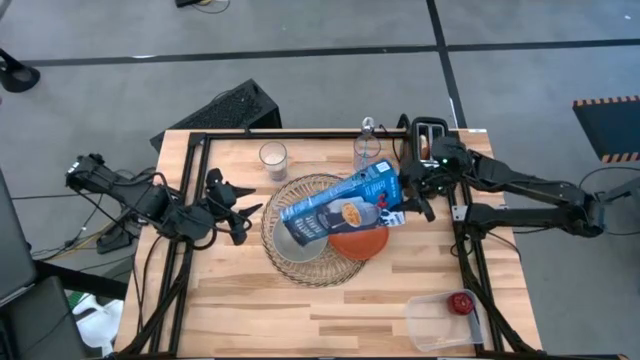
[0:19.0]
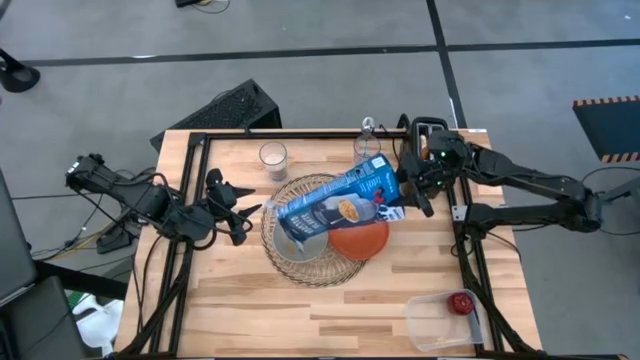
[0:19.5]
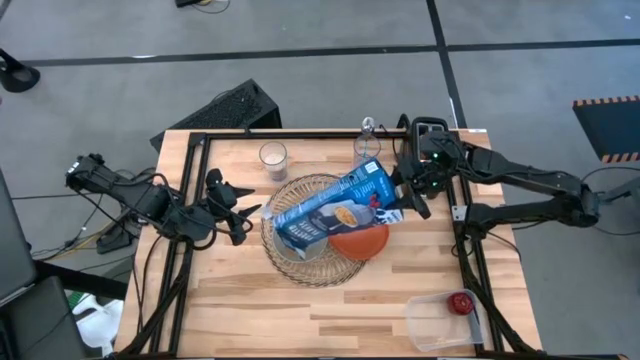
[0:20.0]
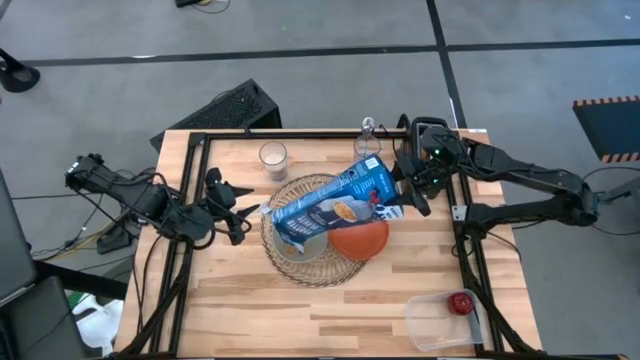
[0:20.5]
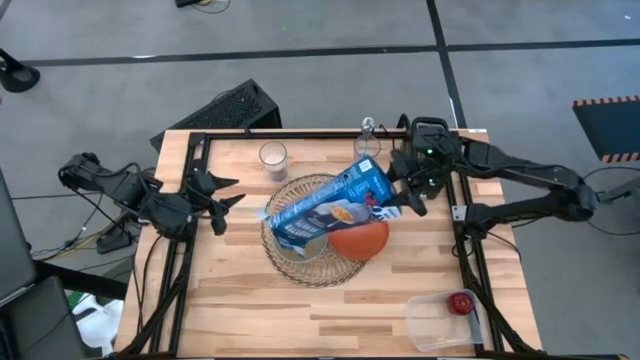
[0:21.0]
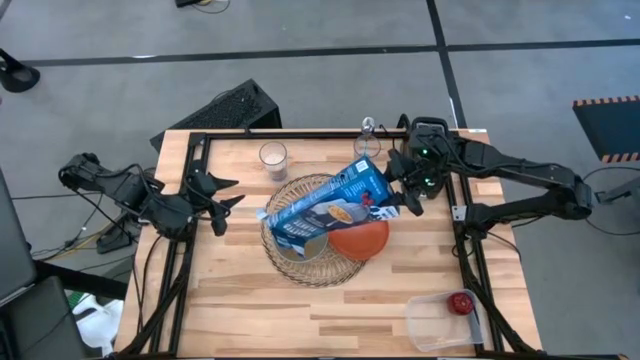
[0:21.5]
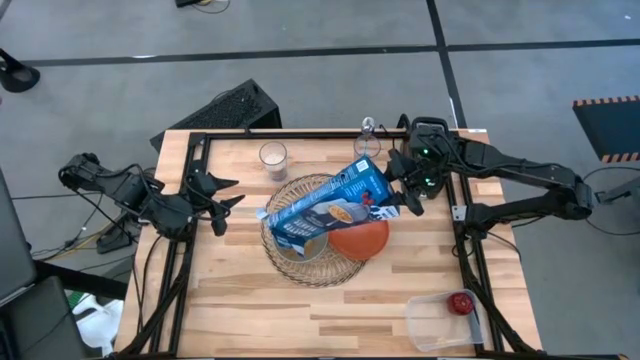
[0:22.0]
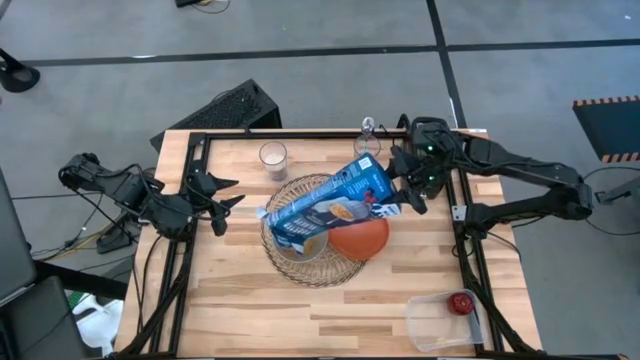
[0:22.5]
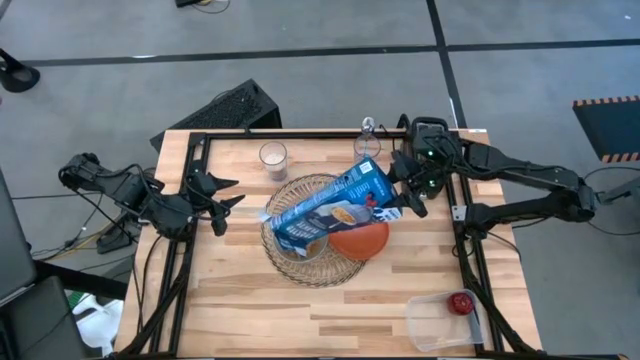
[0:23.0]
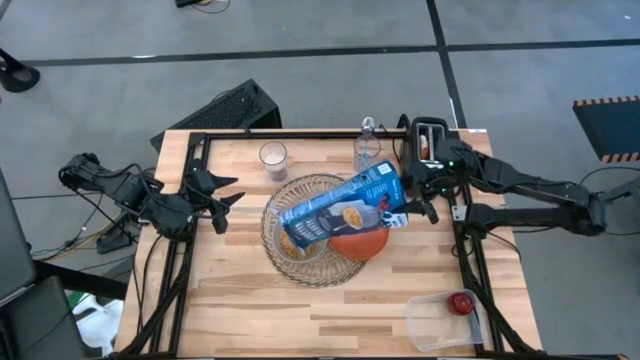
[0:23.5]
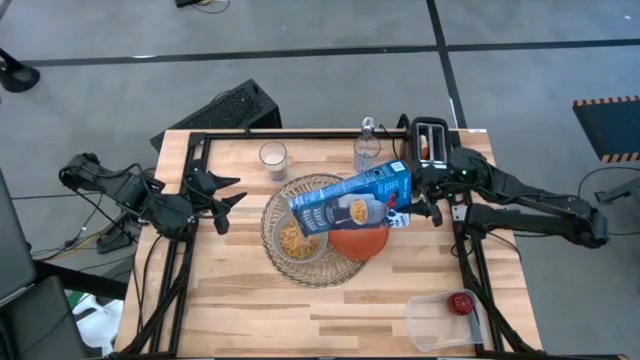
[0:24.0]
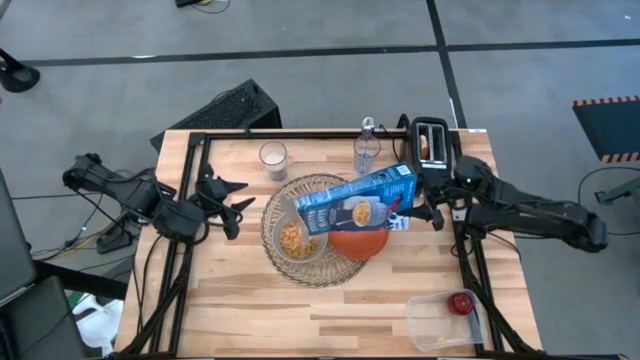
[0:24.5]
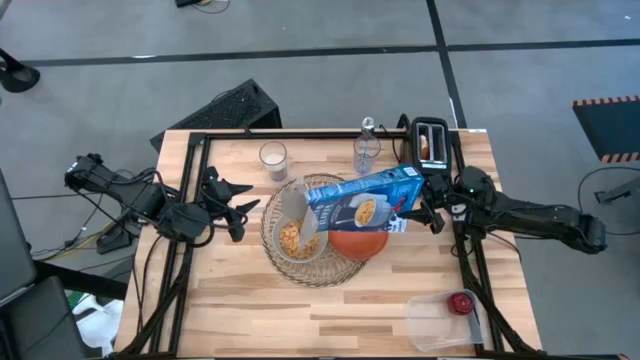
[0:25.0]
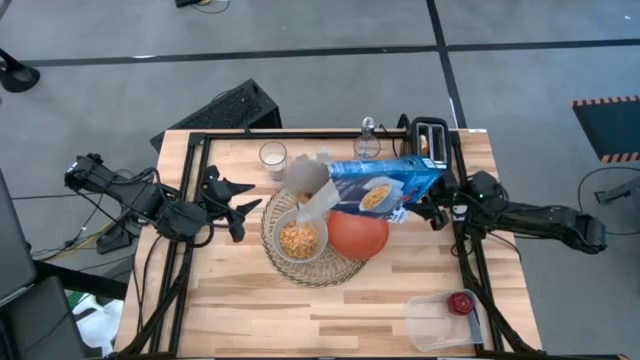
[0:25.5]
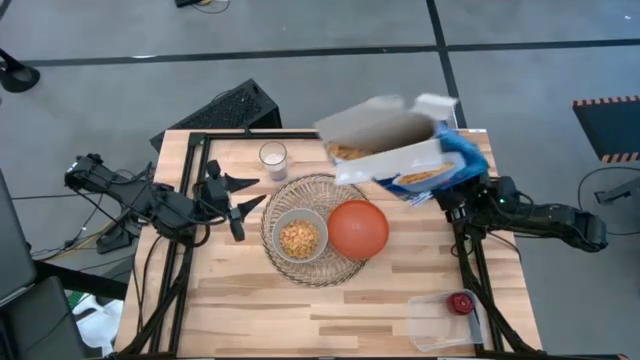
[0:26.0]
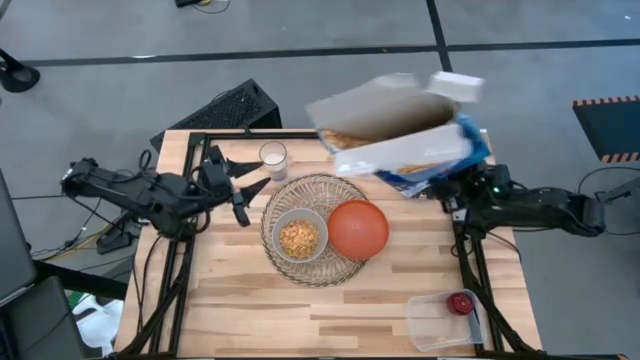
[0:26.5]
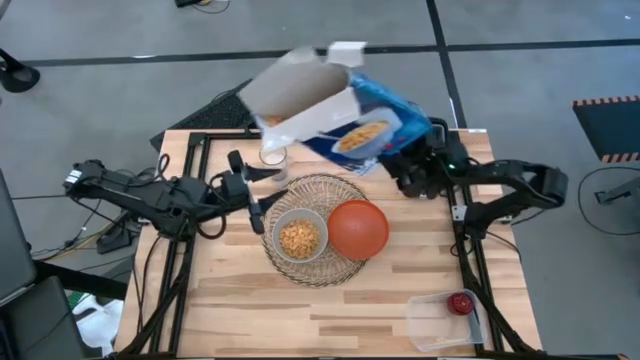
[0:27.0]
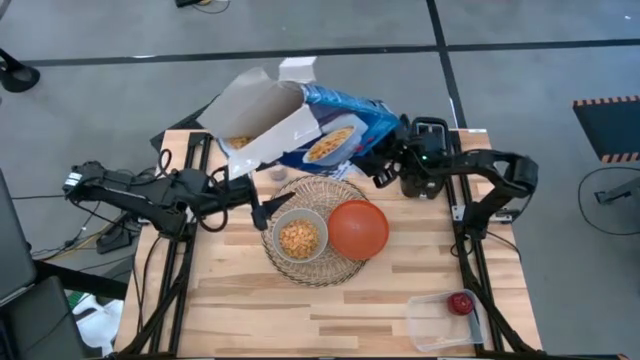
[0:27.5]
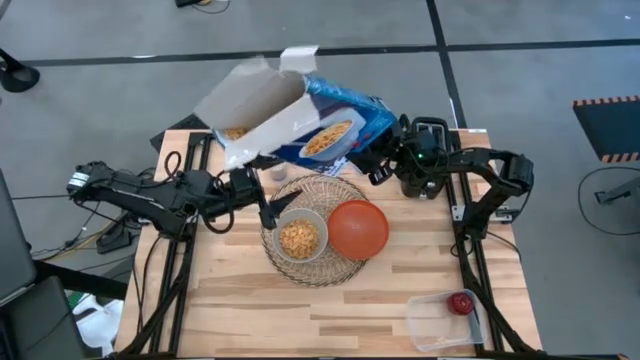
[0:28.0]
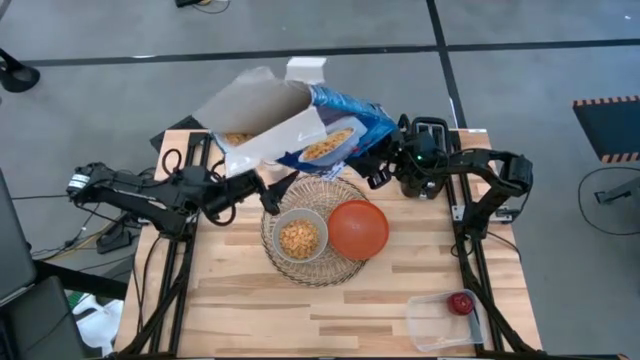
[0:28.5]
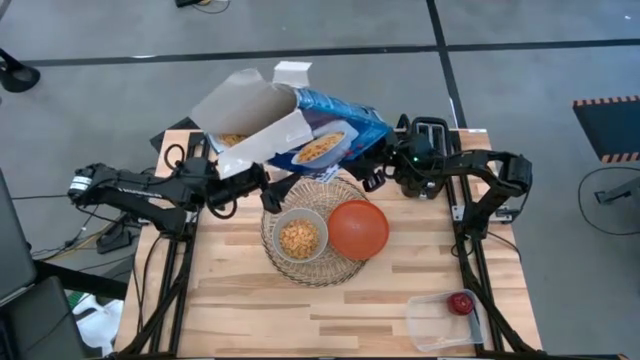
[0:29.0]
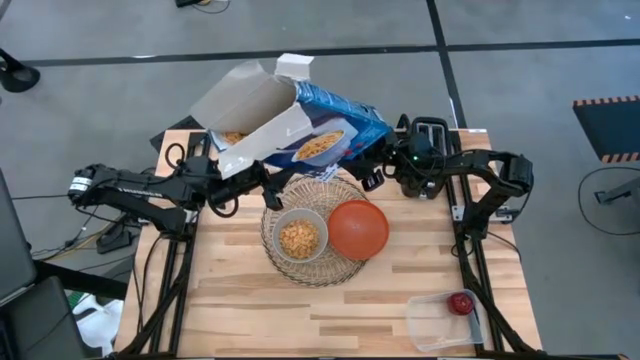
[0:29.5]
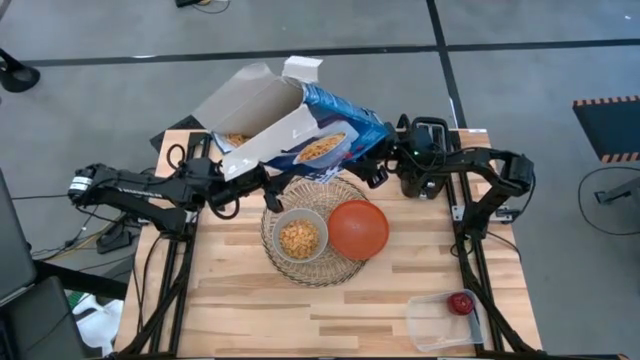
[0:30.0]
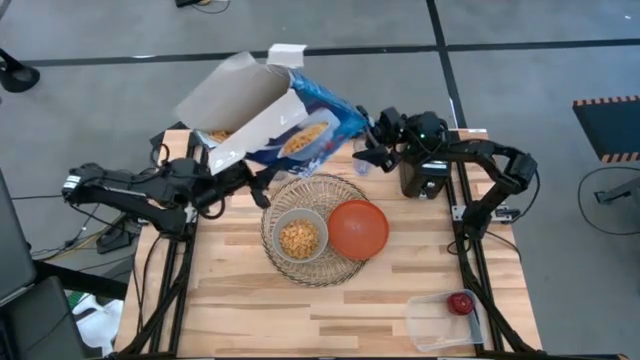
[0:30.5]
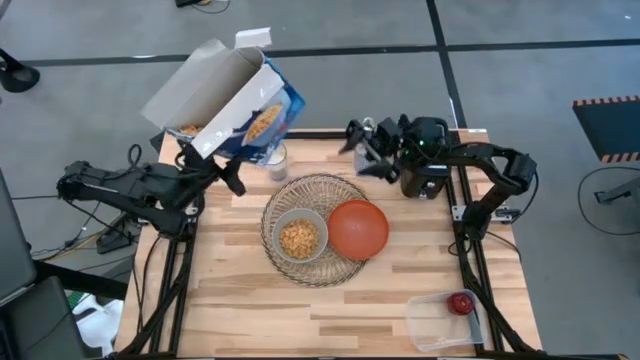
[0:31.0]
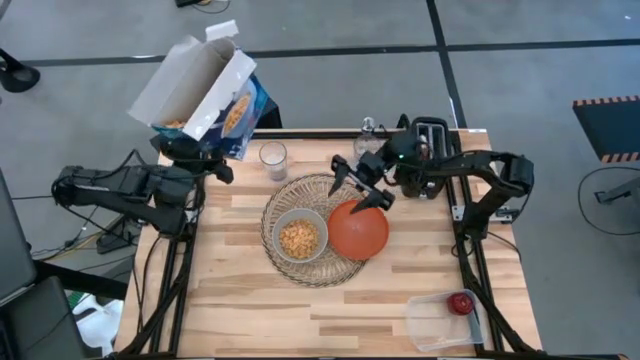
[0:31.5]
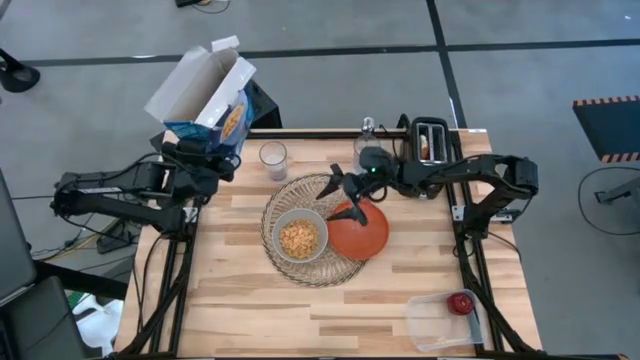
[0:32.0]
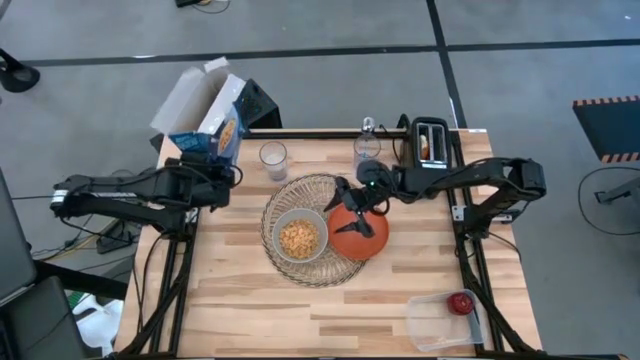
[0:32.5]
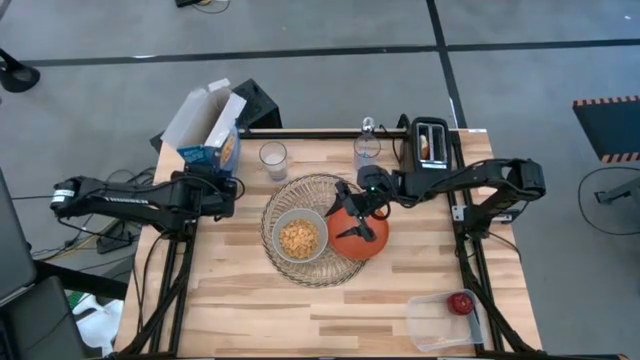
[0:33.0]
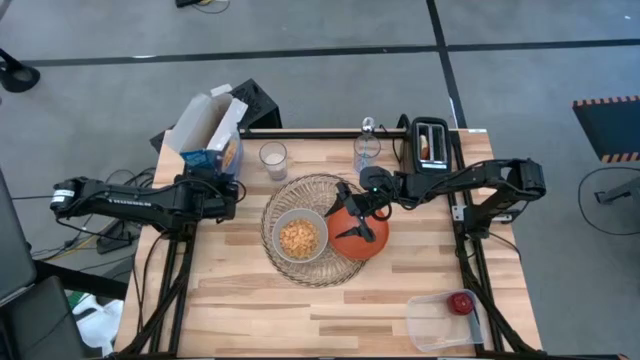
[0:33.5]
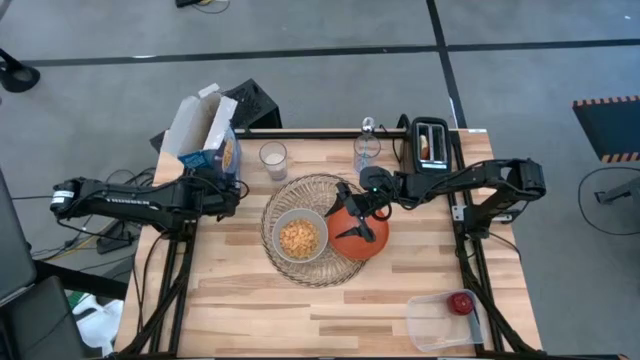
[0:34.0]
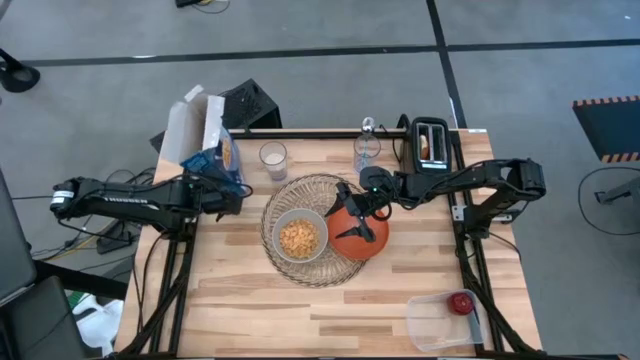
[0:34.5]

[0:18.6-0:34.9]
Task: Arrange a breakfast setting
Pour the cereal from the cereal box into the white bowl

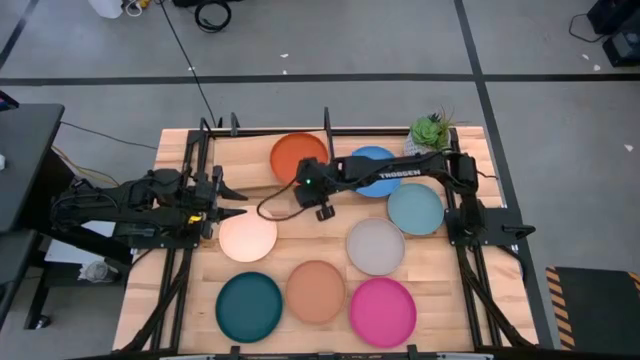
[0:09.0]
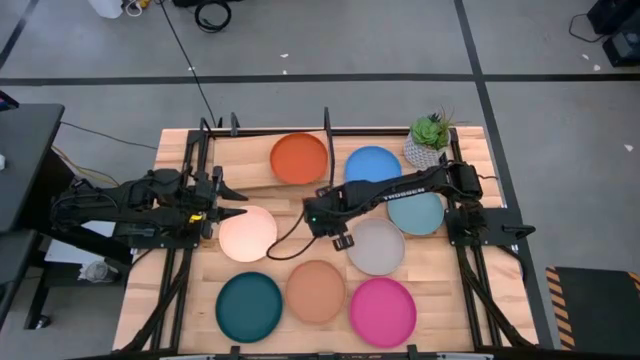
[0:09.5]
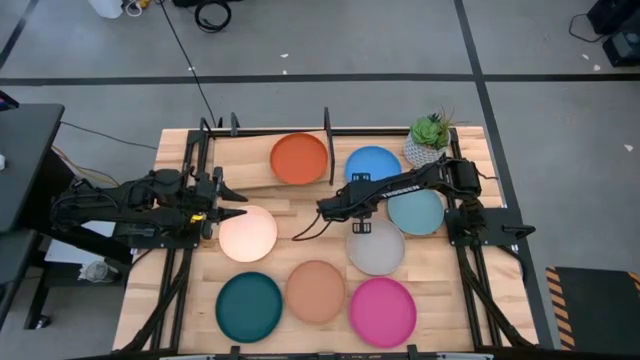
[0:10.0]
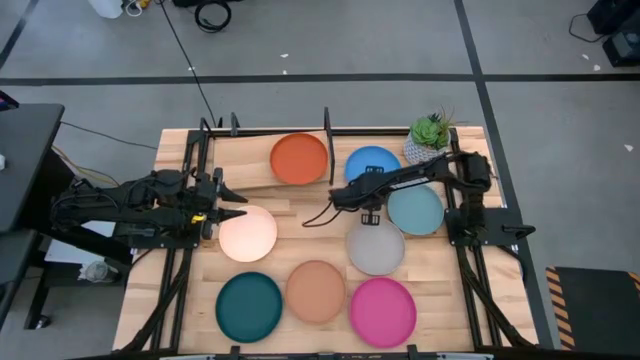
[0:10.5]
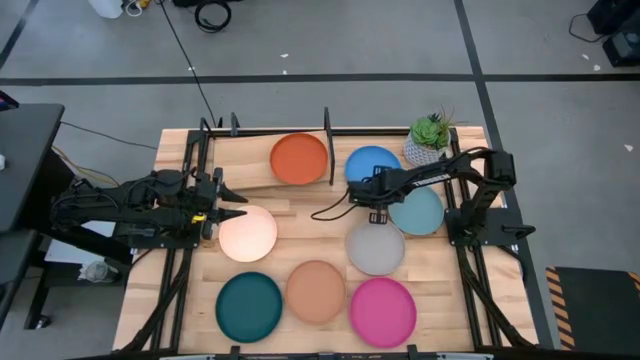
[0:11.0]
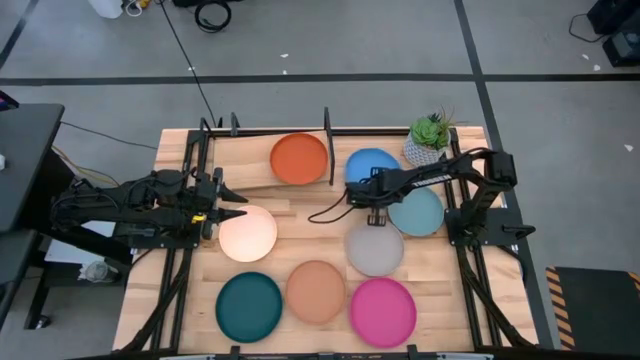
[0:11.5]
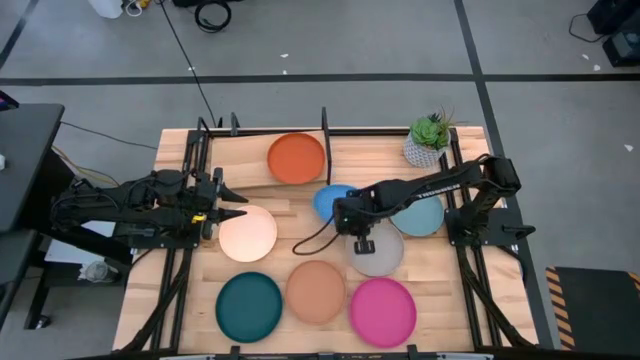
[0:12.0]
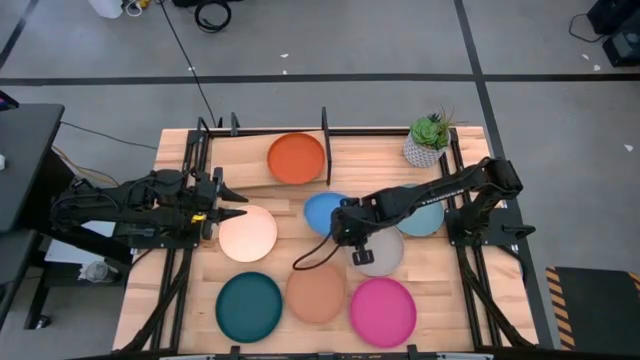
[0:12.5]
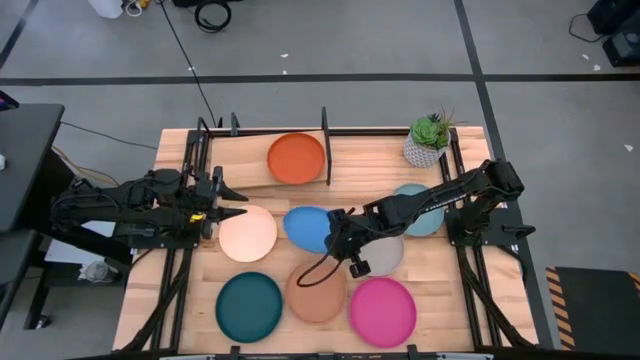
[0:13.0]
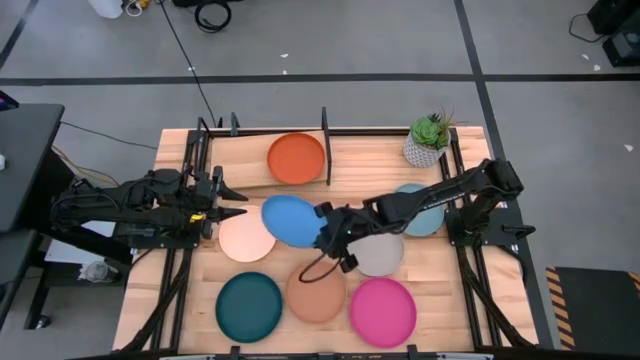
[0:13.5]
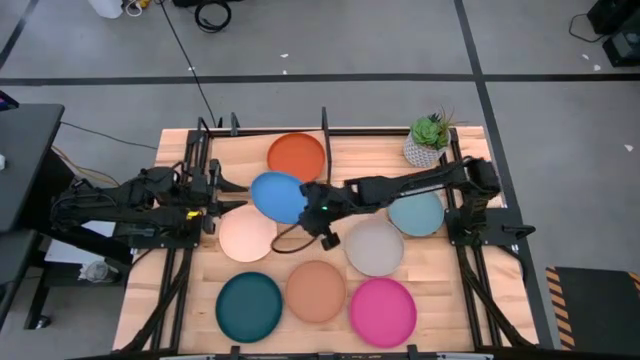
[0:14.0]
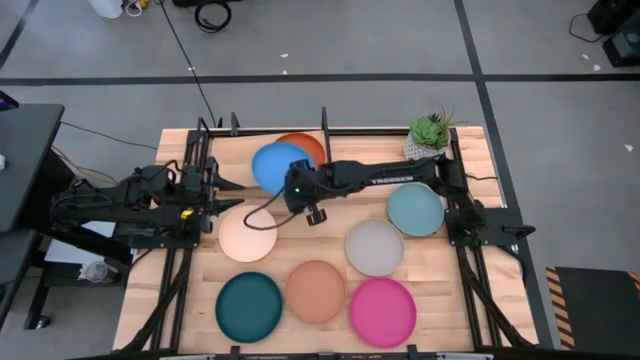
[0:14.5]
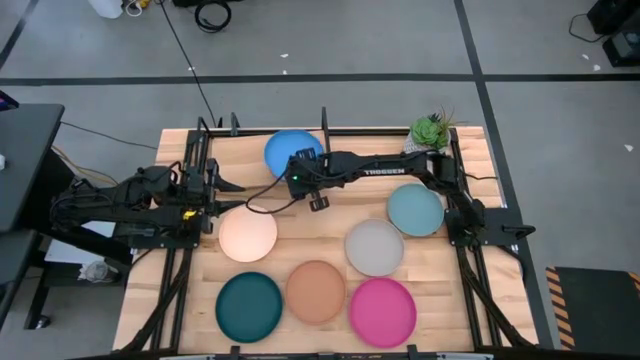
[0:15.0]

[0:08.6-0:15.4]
Task: Place and stack plates onto a shelf
Stack the blue plate on the orange plate
